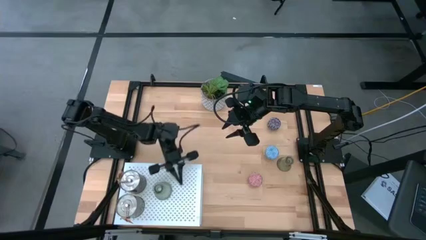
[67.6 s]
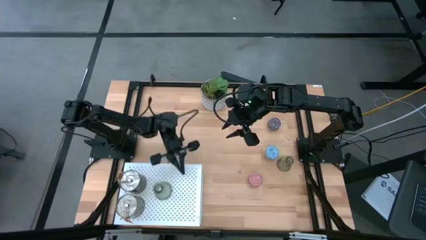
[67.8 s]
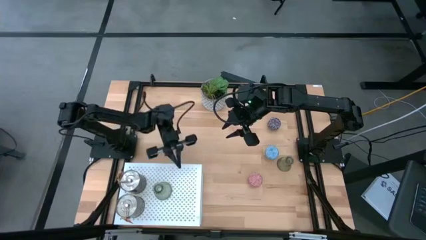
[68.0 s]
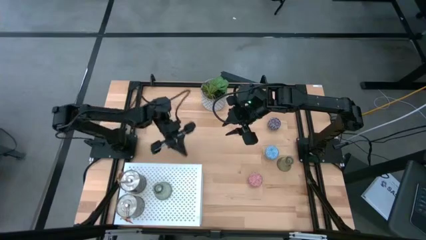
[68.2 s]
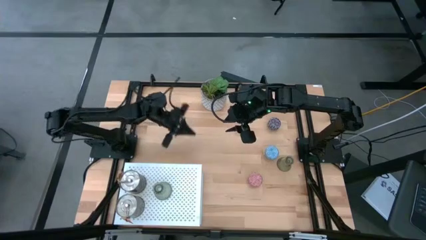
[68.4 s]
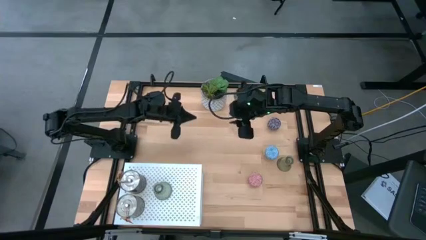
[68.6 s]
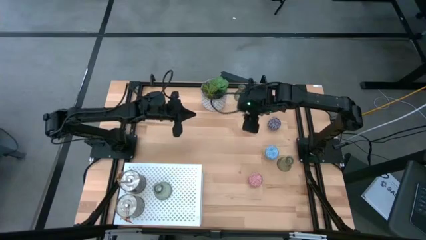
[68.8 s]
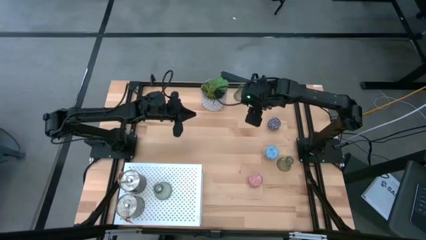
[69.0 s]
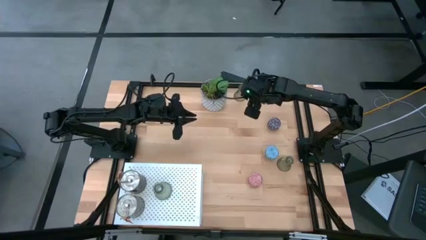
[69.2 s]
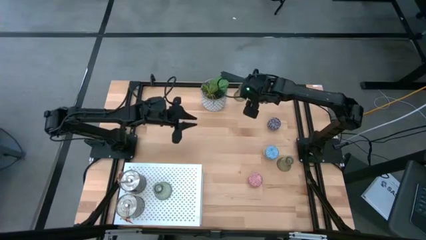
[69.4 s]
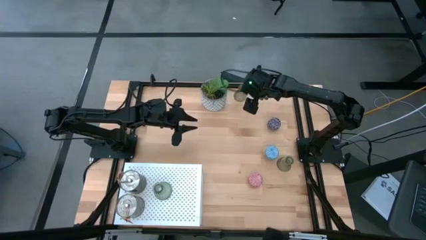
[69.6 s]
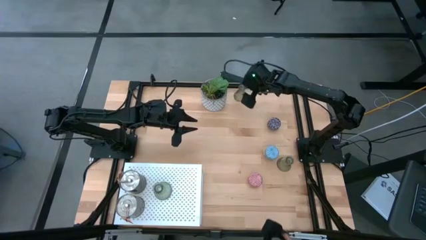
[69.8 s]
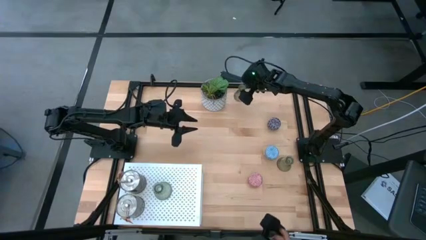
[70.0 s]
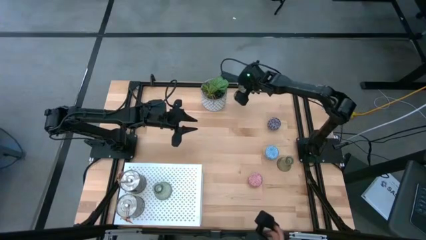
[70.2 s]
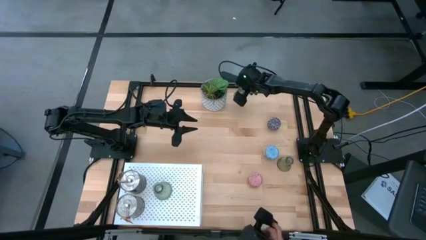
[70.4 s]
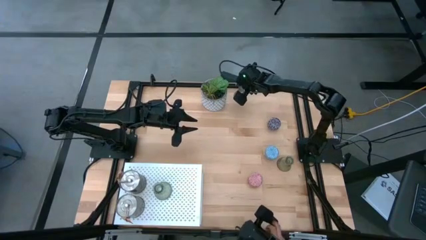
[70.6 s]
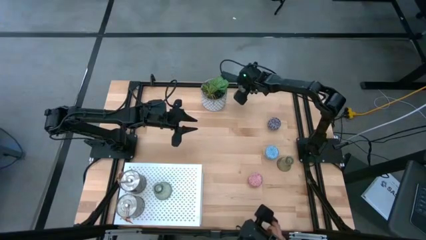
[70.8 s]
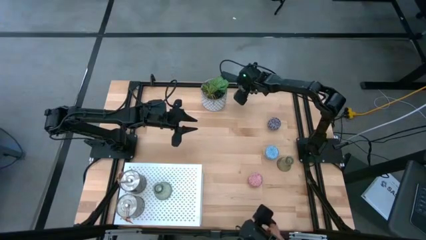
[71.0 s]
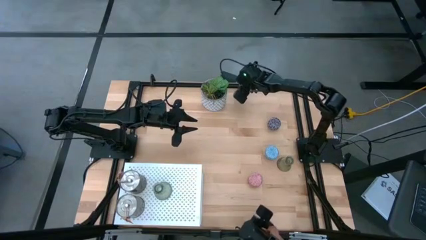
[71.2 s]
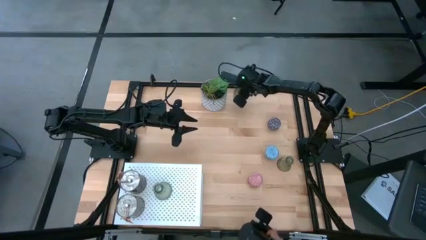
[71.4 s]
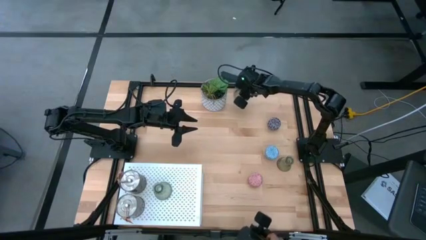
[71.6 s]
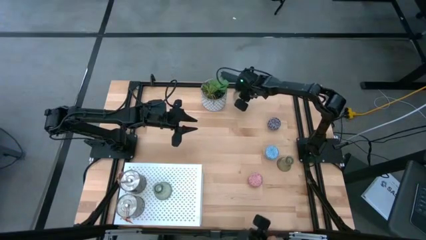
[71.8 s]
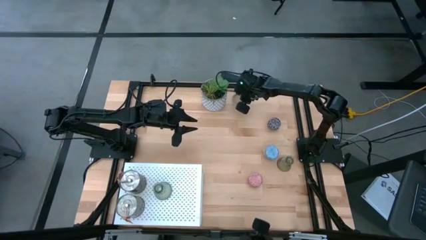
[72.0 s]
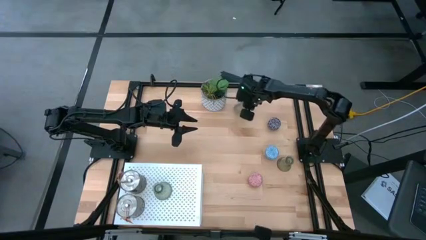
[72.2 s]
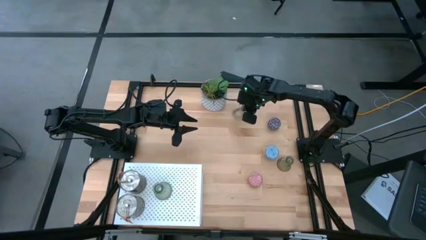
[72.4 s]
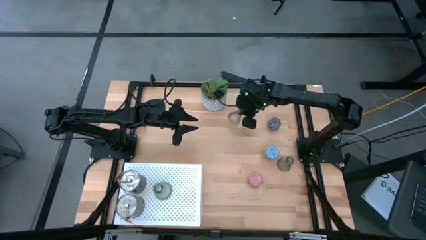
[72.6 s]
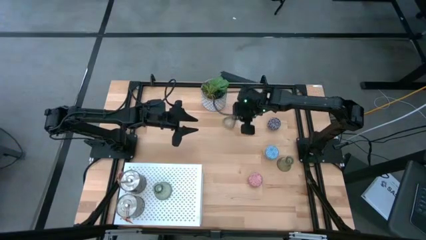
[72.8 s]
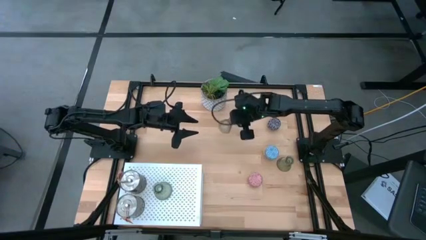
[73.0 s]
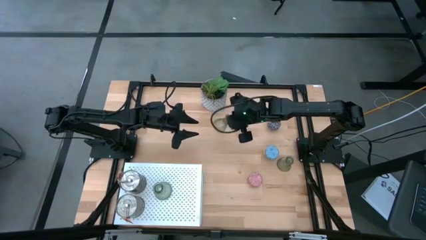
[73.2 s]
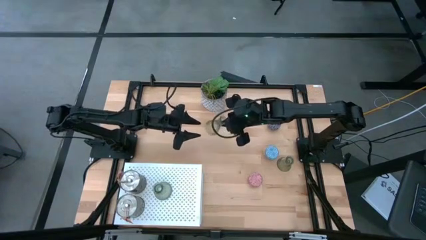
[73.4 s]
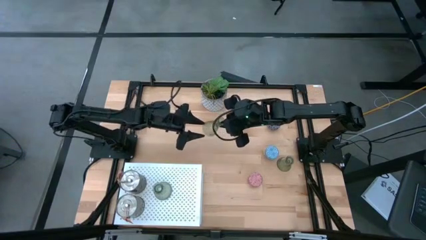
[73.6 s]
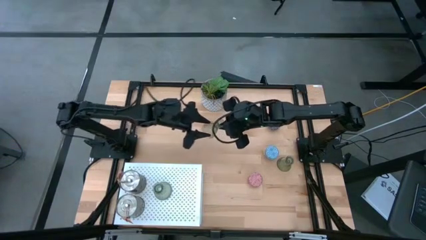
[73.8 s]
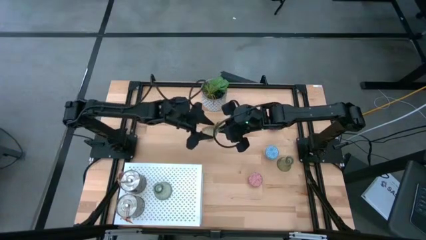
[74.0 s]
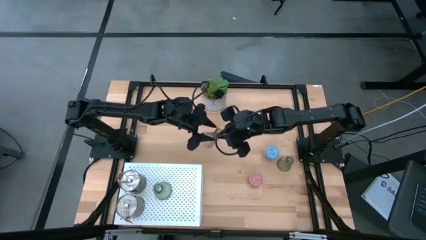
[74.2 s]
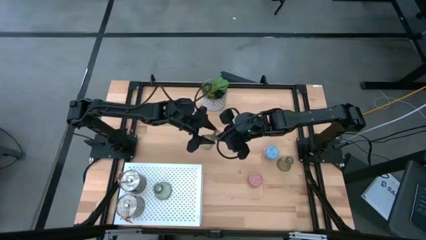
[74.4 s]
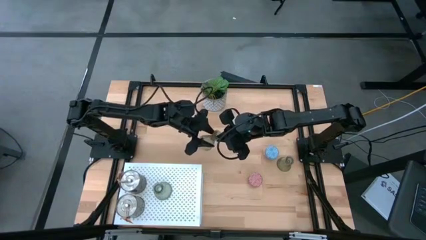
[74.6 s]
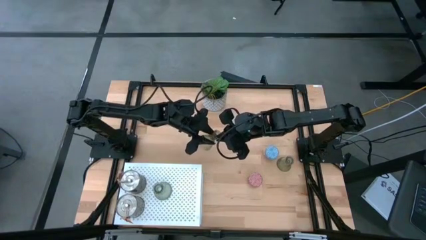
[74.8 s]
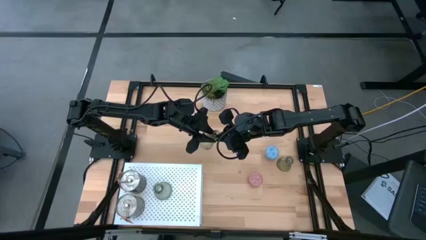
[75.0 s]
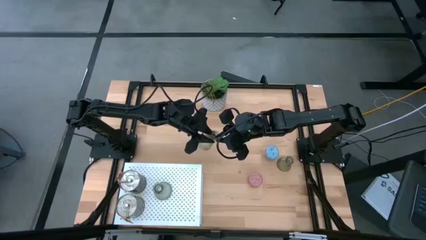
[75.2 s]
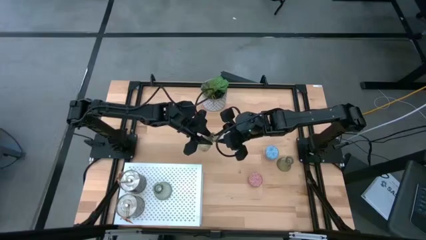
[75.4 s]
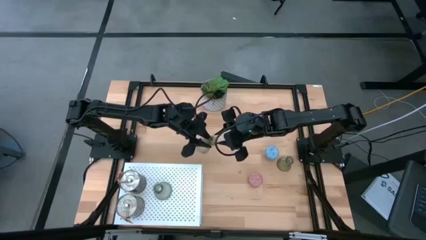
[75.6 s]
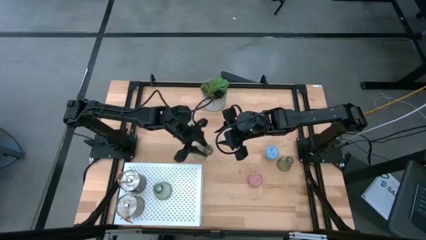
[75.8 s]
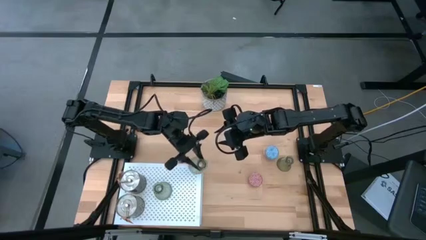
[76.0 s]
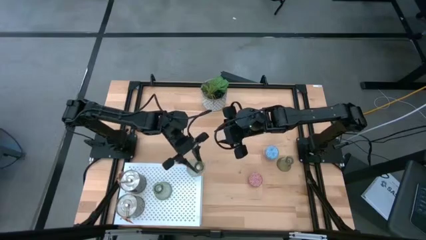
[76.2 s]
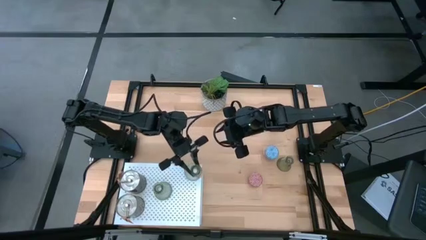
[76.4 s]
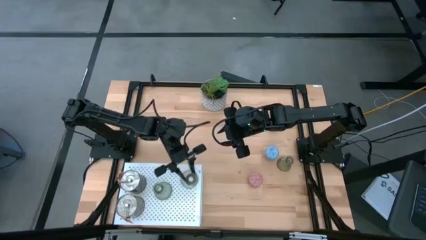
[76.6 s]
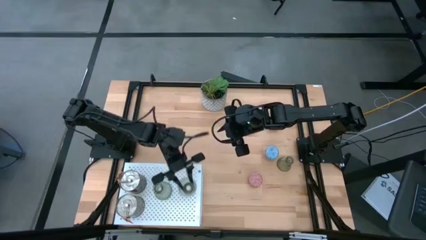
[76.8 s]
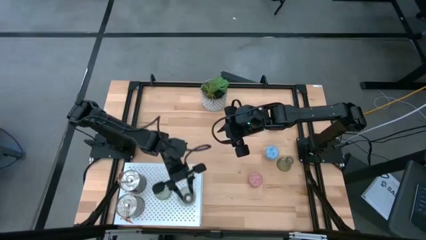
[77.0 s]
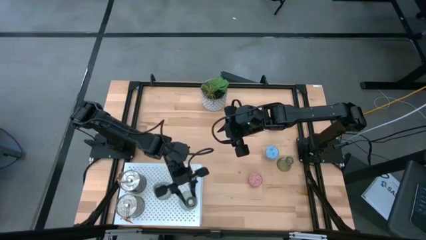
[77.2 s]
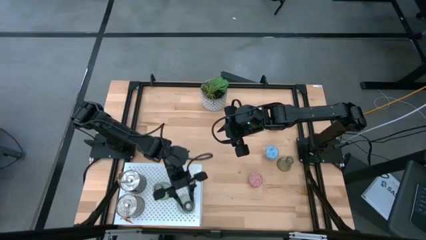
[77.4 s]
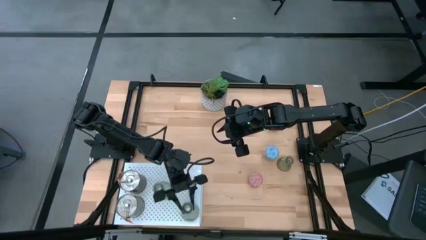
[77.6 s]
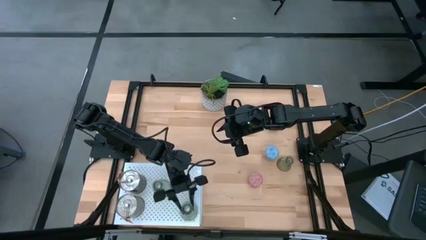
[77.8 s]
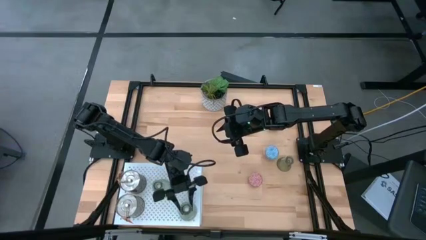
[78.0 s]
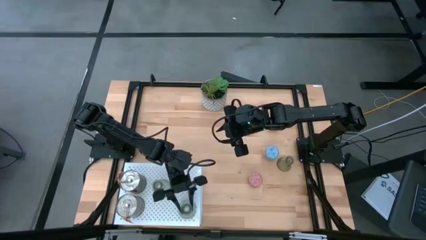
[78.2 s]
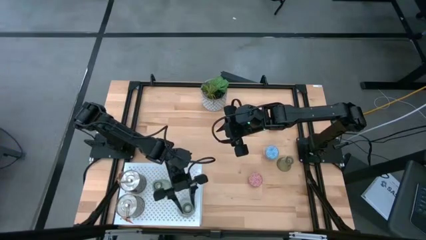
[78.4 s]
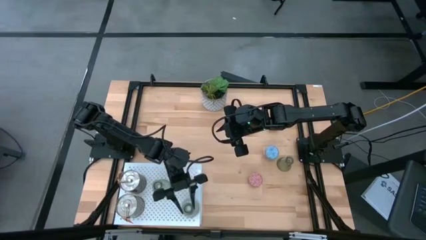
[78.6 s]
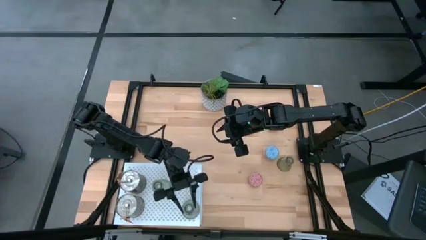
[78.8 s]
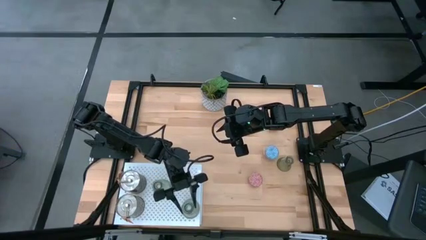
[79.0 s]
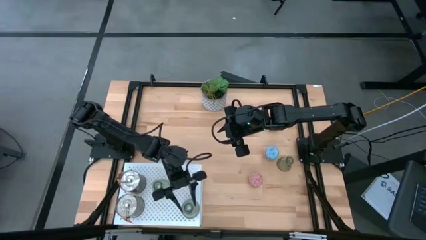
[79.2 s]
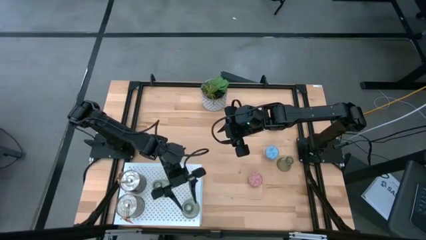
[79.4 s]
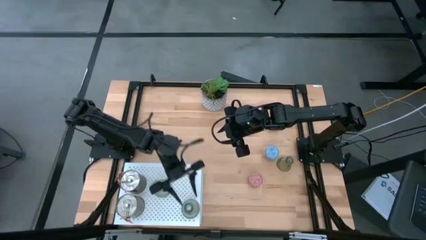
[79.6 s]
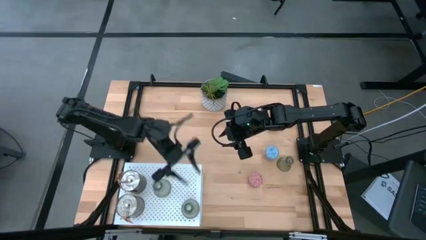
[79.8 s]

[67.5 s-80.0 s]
Task: Pick & Place candle stick holders
Put the top transparent candle holder on the shelf

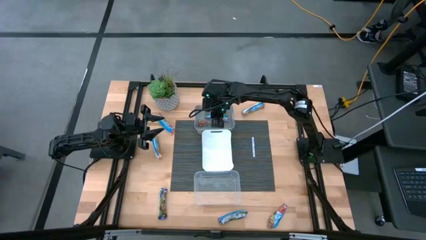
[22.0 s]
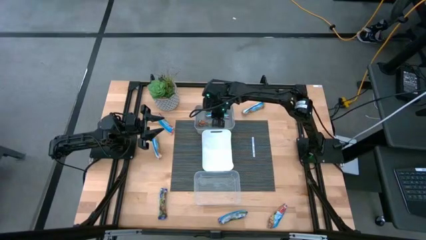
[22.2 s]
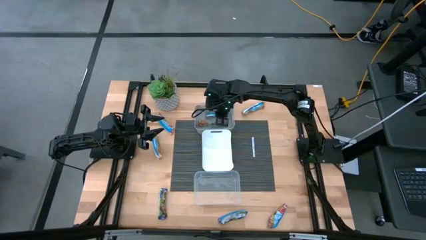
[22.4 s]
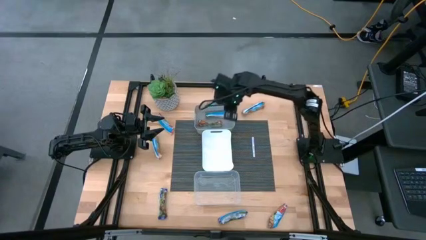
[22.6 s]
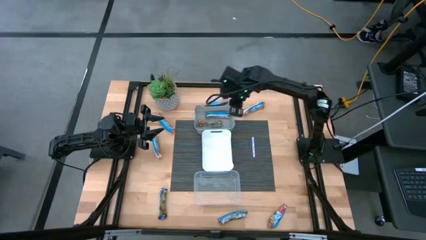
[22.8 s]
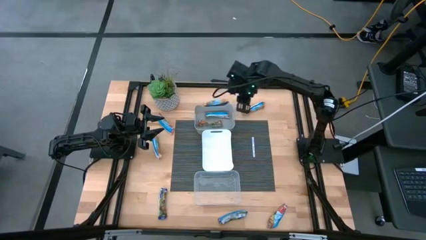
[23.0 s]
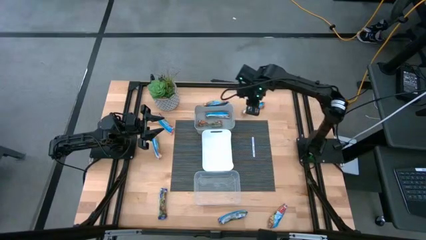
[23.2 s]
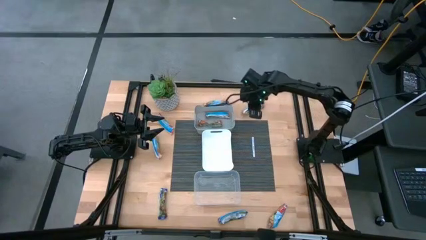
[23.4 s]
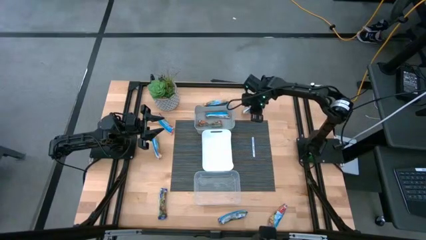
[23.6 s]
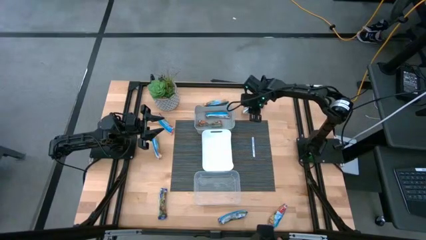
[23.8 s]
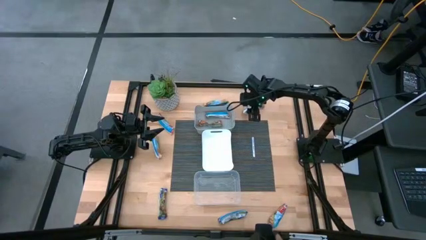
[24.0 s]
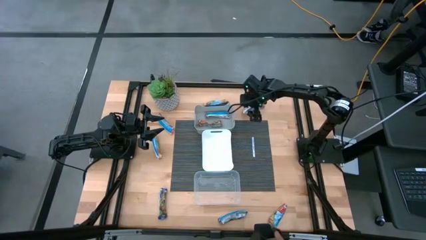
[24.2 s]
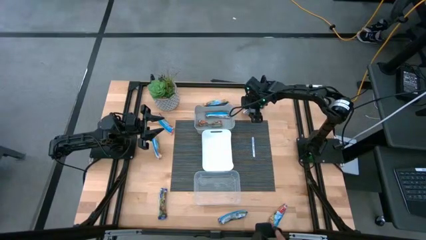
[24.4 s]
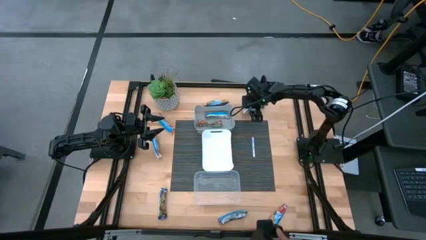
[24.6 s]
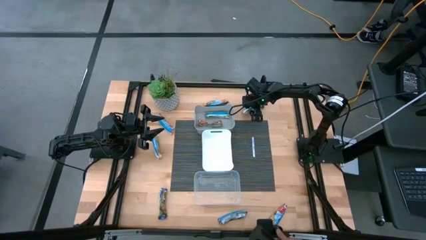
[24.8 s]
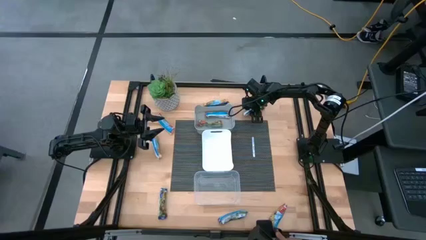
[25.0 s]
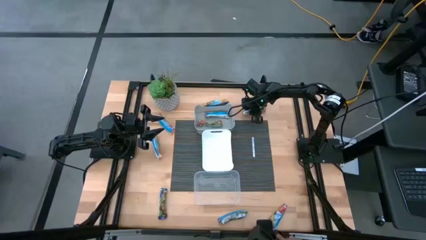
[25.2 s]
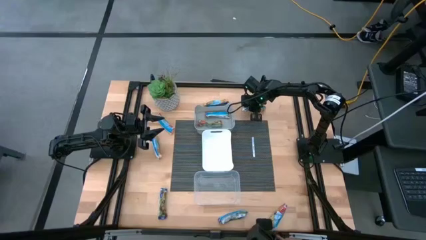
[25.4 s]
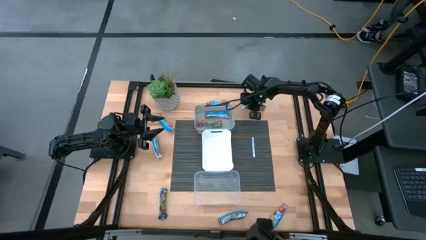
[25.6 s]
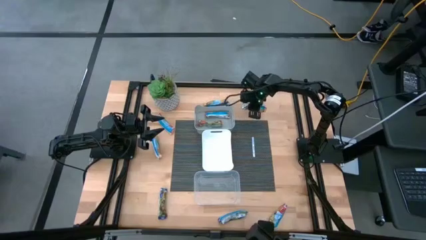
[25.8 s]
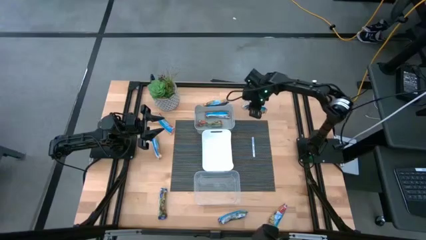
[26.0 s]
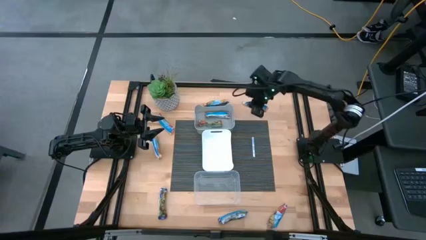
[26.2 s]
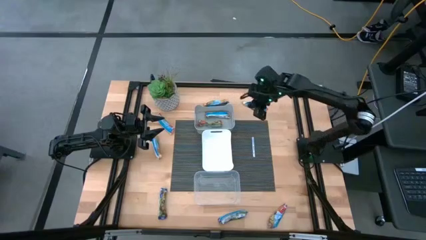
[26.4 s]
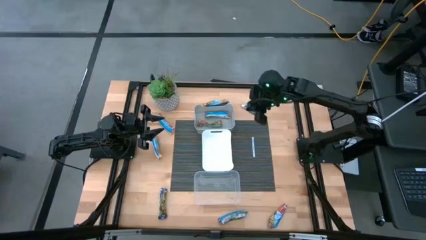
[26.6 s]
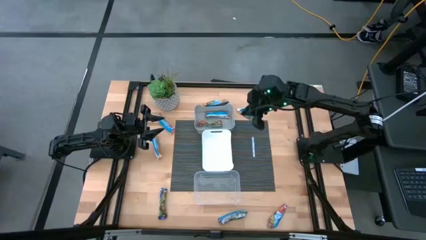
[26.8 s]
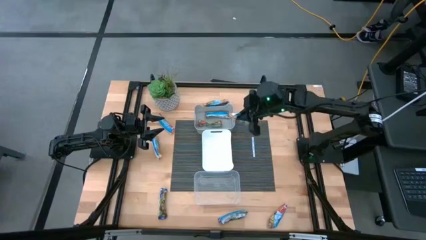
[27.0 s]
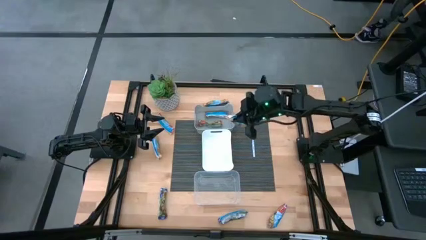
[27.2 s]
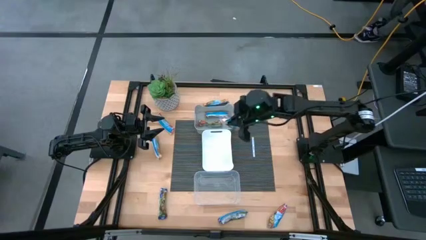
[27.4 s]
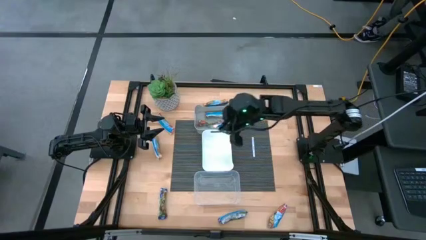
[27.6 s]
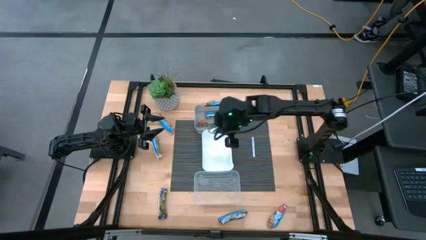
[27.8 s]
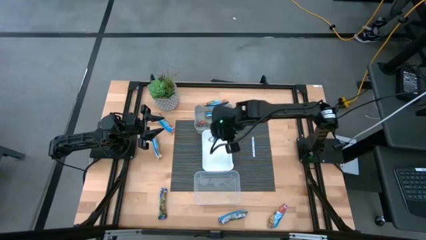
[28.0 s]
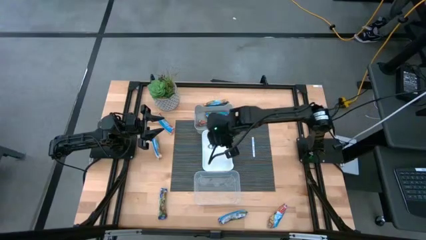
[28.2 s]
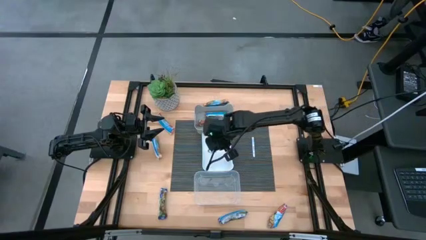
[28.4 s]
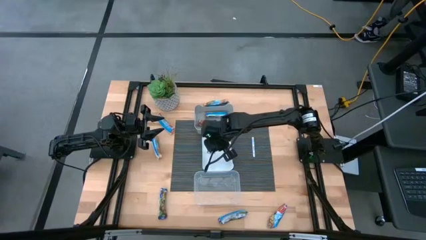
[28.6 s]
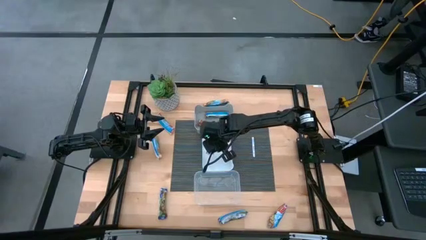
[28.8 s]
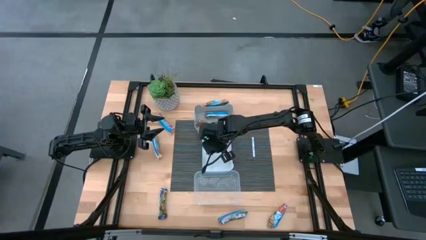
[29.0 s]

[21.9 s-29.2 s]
Task: Pick and place Granola Bars by type
Put the top right orange granola bar into the white bin
